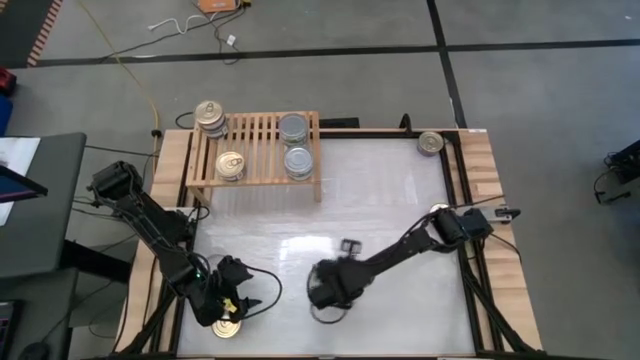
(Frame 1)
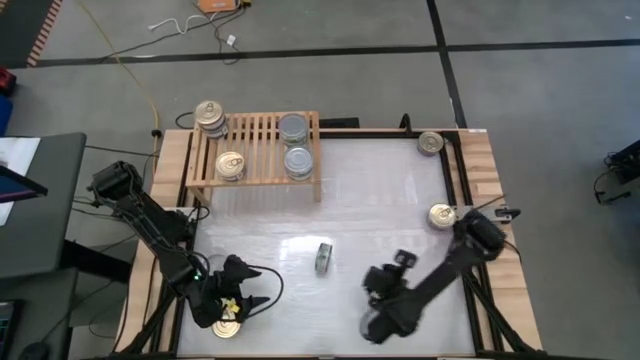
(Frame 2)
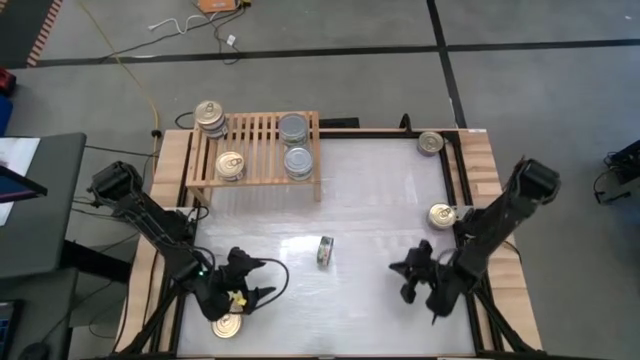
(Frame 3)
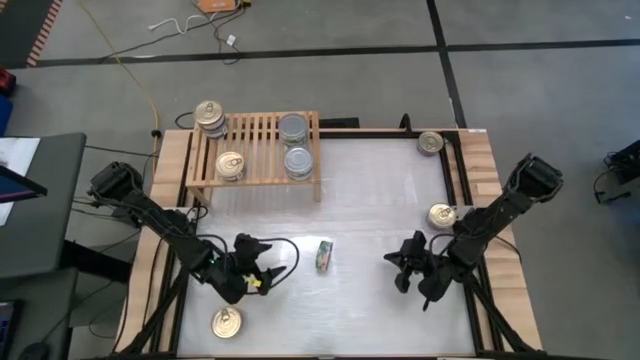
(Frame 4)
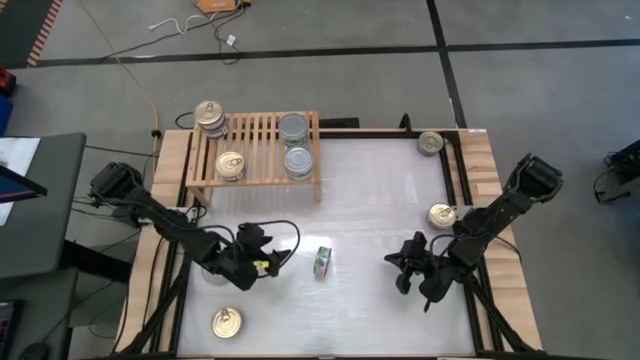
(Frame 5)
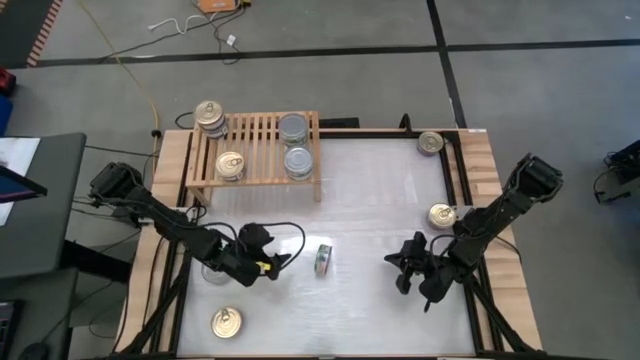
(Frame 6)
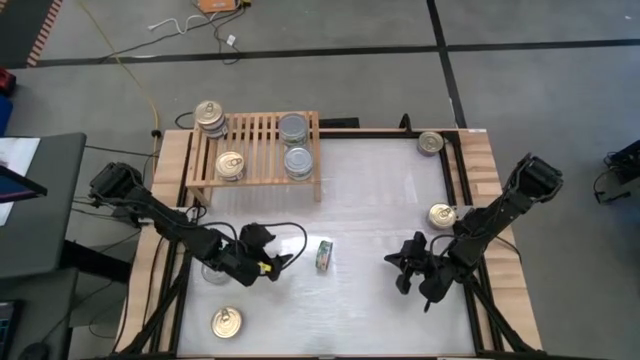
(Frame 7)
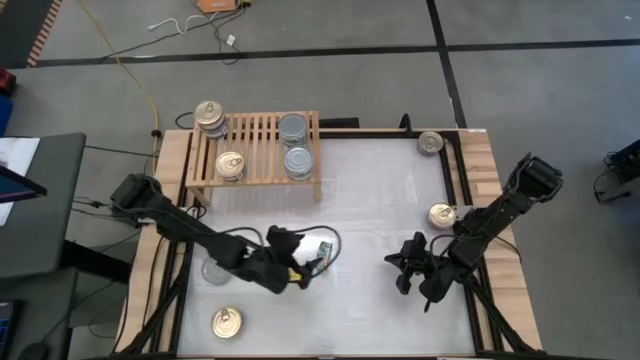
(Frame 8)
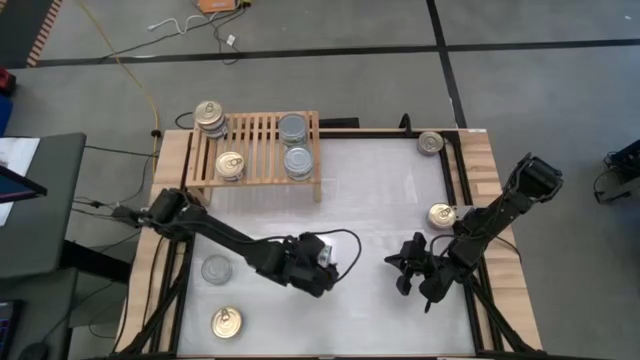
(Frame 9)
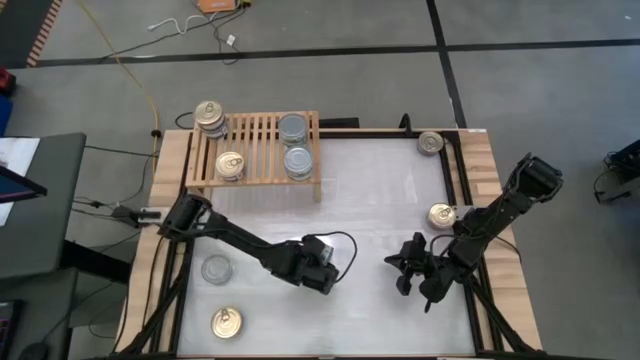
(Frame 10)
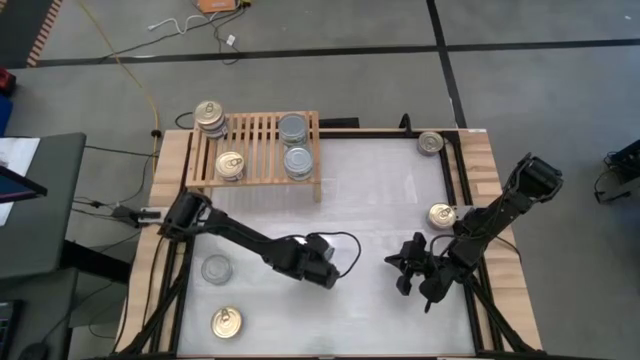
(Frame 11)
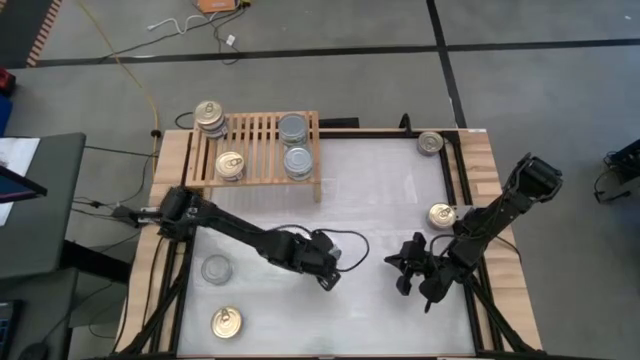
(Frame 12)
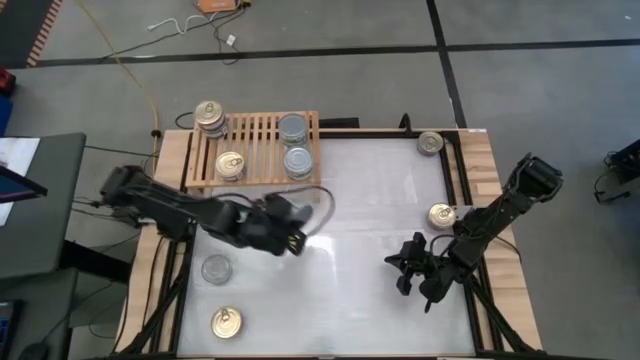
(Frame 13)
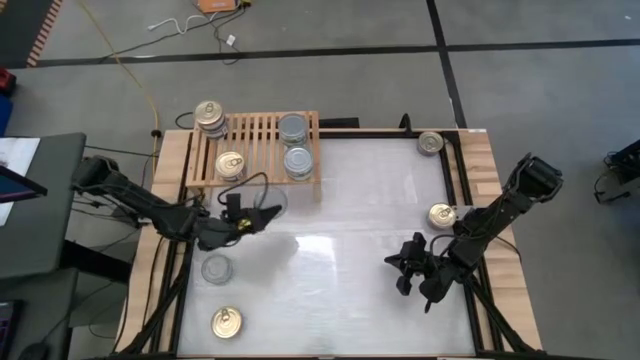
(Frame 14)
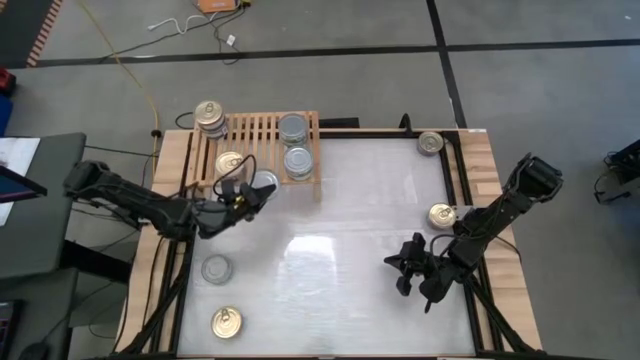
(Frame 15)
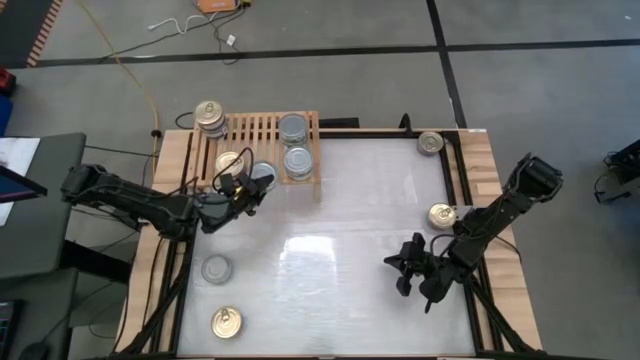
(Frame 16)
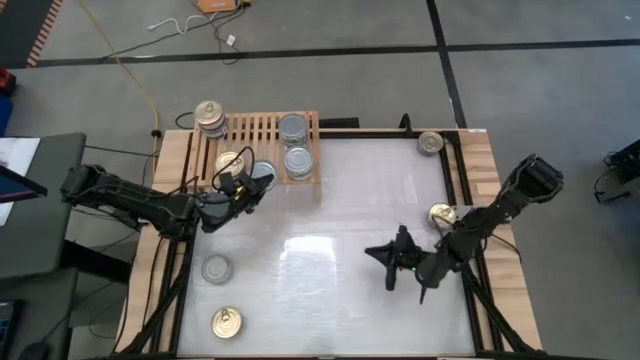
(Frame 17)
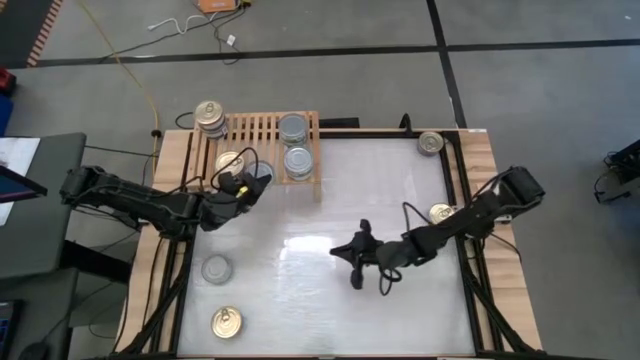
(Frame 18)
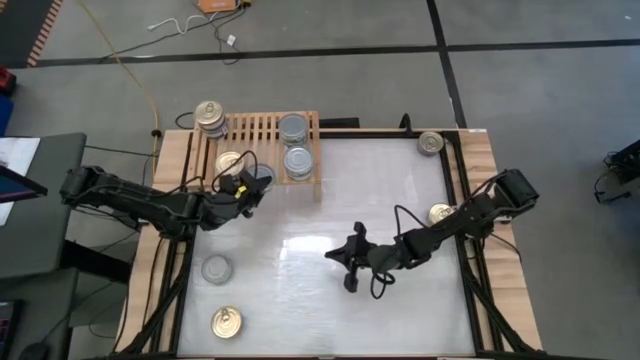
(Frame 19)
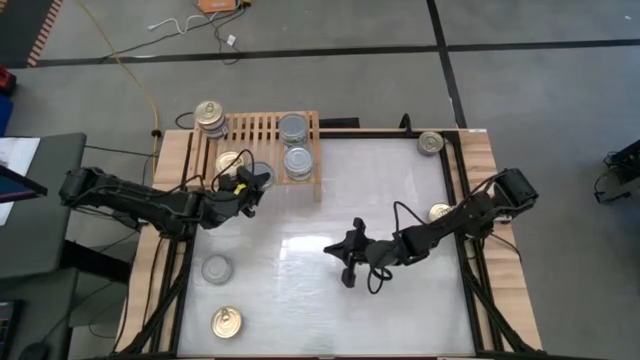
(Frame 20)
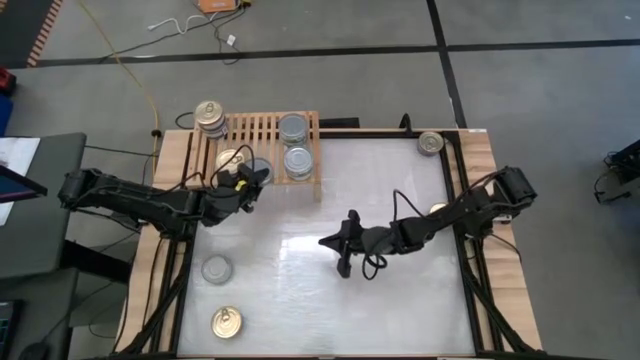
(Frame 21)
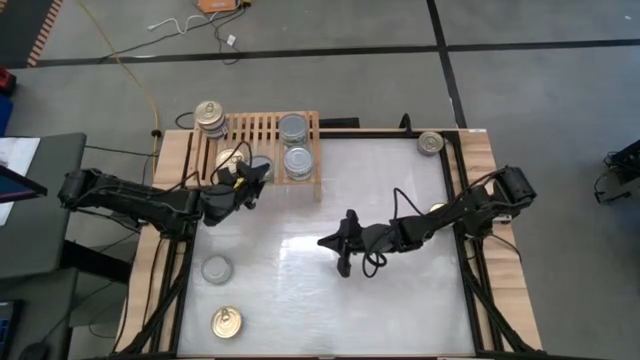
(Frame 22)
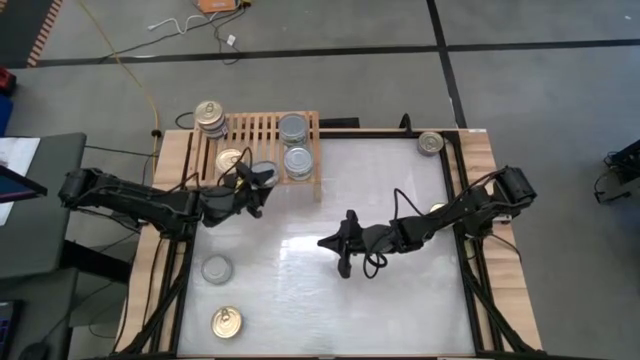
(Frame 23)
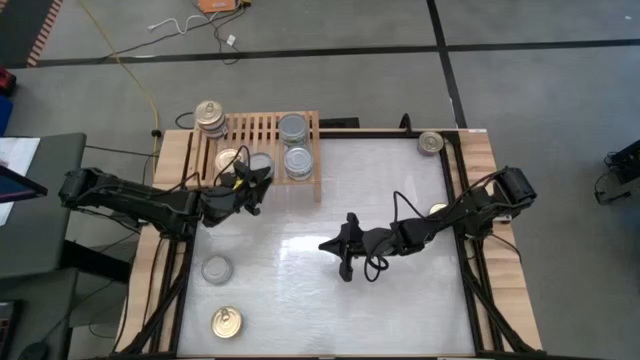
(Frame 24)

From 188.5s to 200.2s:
Task: Stack canned seafood by type on shelf
Put the green tuna can on the shelf

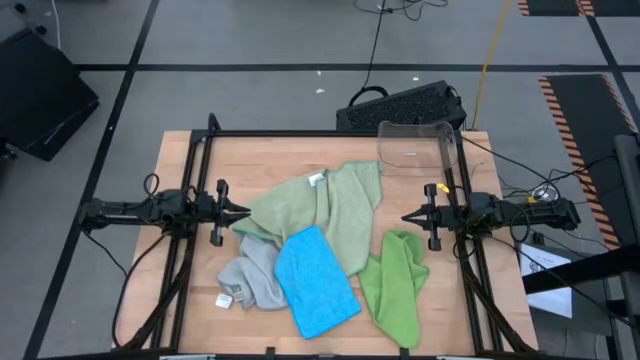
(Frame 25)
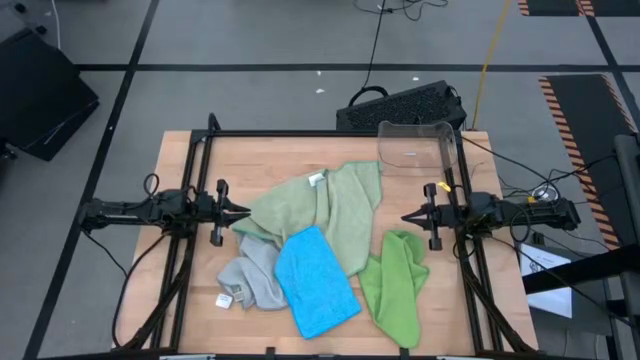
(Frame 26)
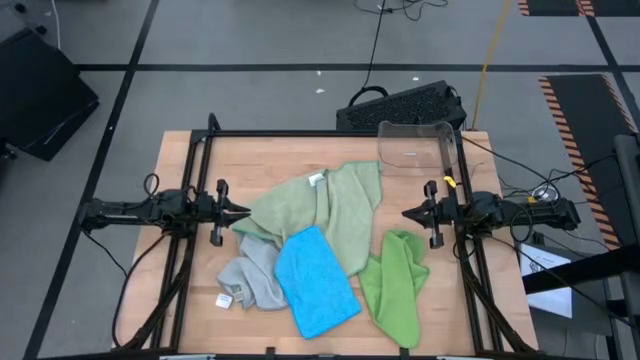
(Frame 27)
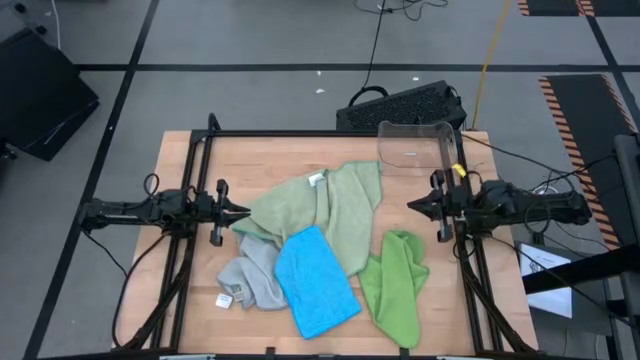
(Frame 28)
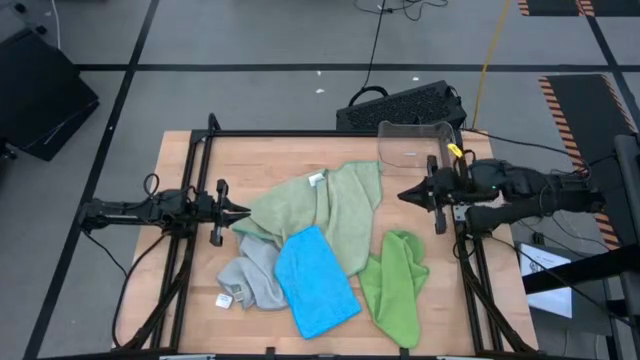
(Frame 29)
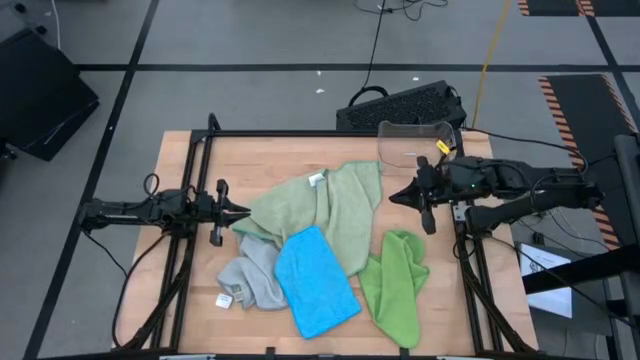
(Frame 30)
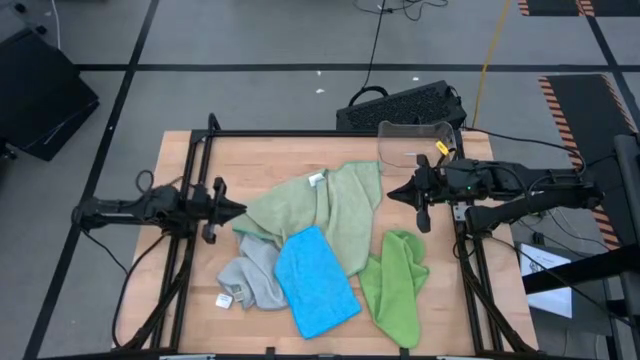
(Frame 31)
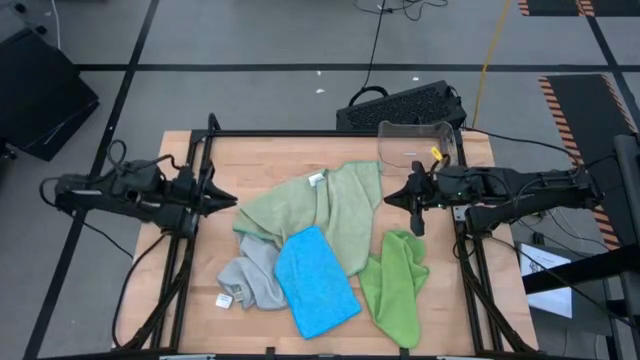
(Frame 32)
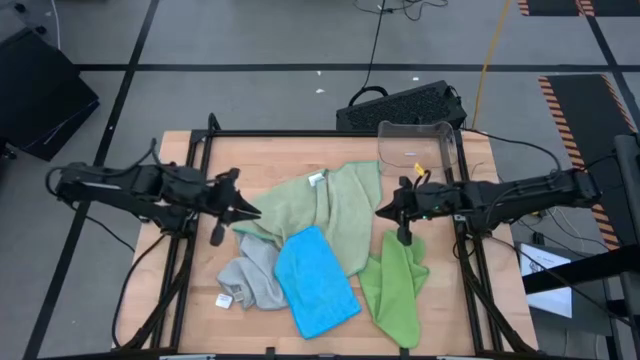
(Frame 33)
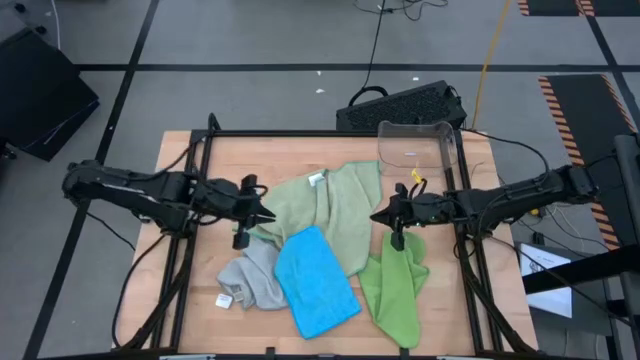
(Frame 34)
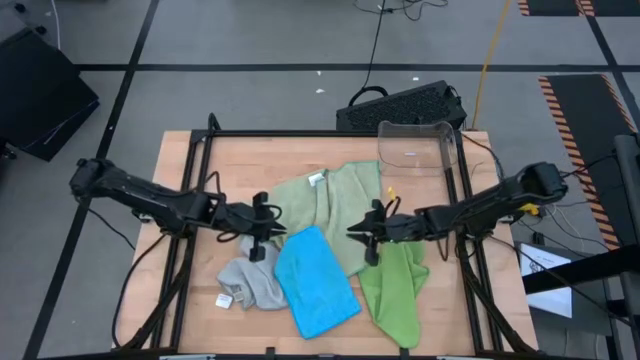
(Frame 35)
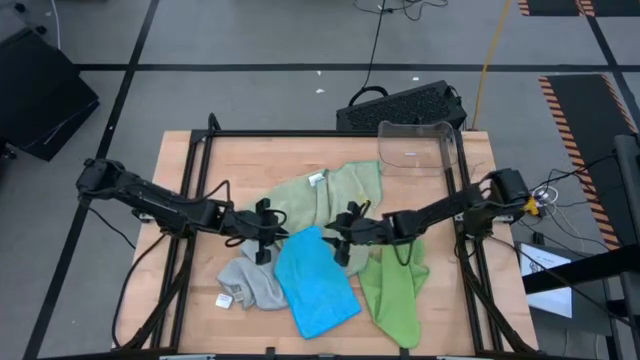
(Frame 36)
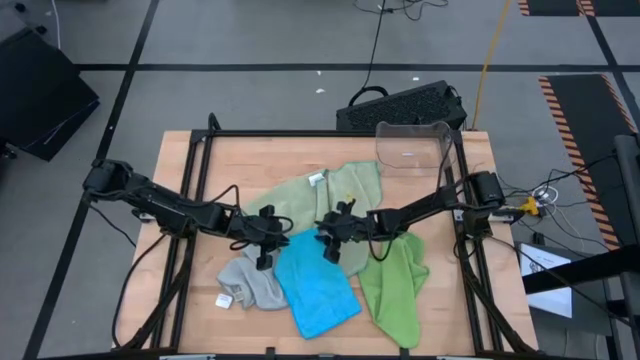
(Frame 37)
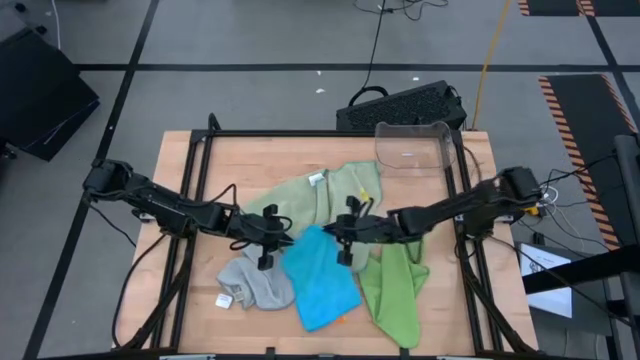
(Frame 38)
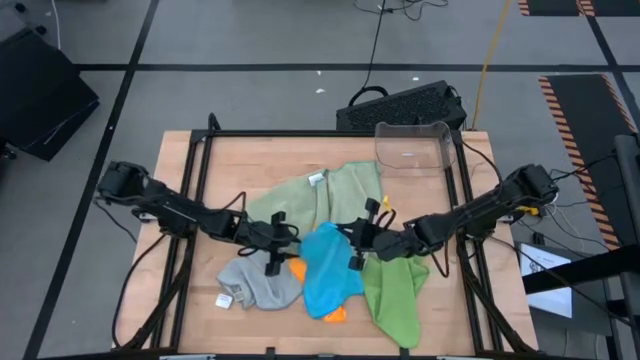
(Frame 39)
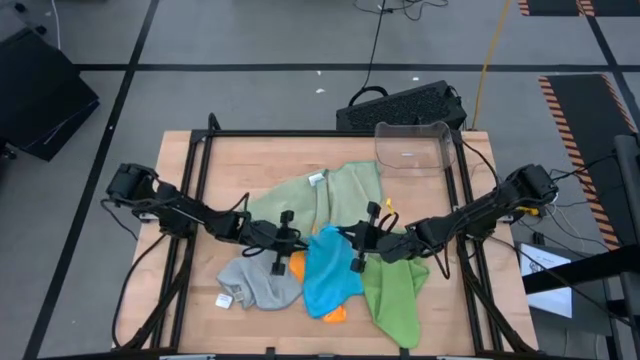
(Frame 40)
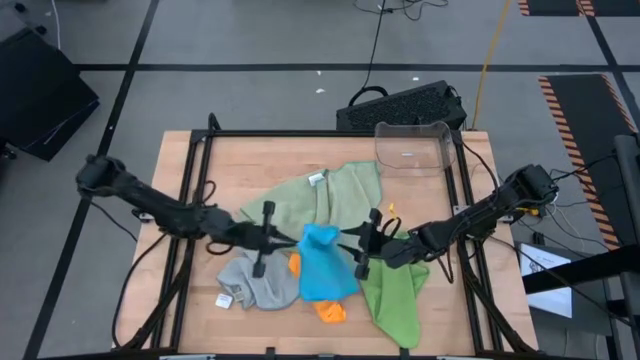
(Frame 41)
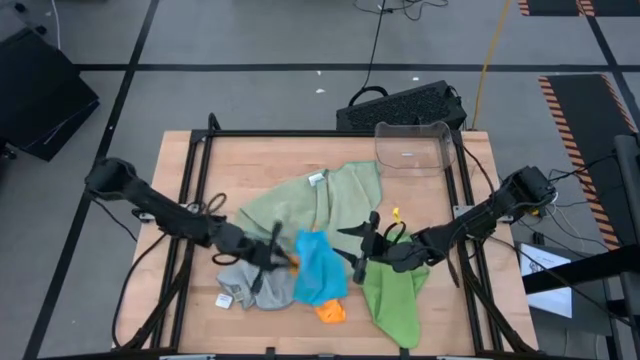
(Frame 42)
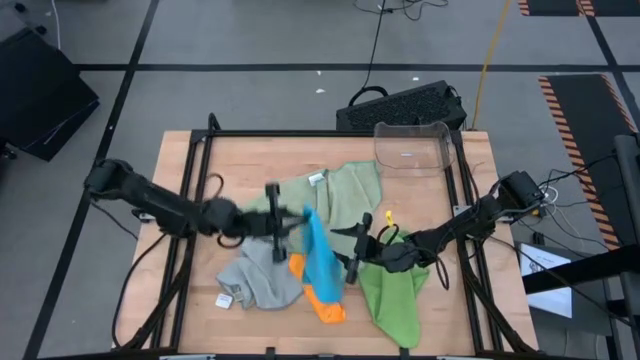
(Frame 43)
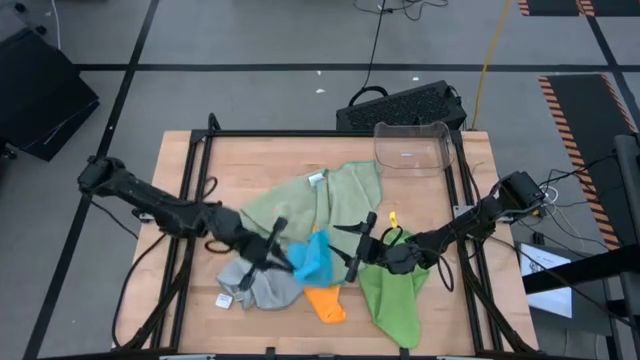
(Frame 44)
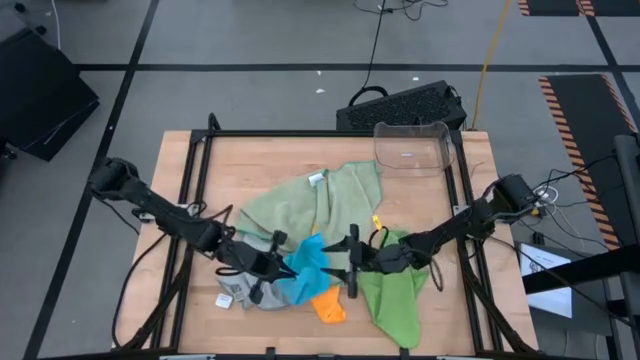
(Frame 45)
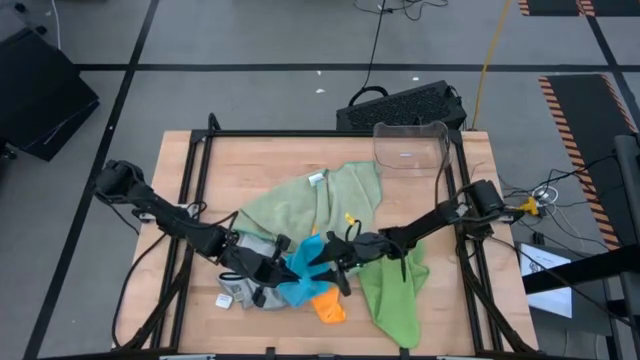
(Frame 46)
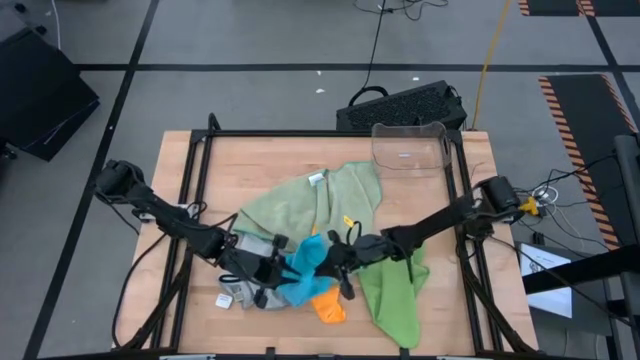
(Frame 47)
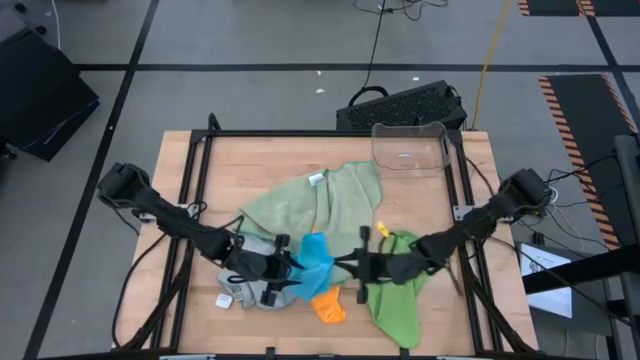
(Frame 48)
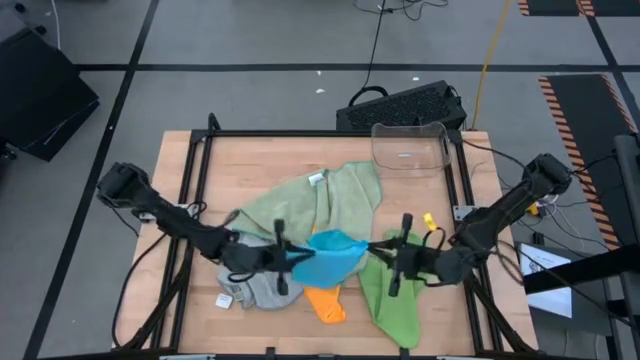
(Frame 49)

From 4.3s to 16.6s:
Task: Fold microfiber towels
Fold the blue microfiber towel
